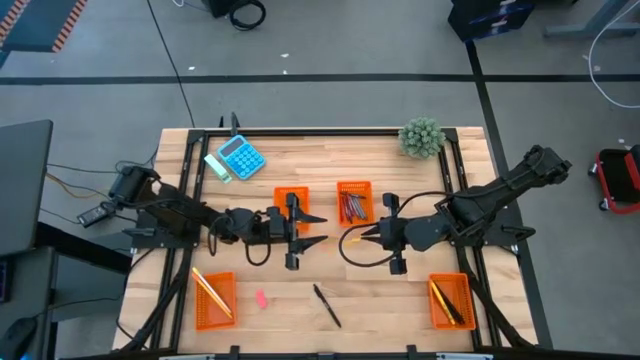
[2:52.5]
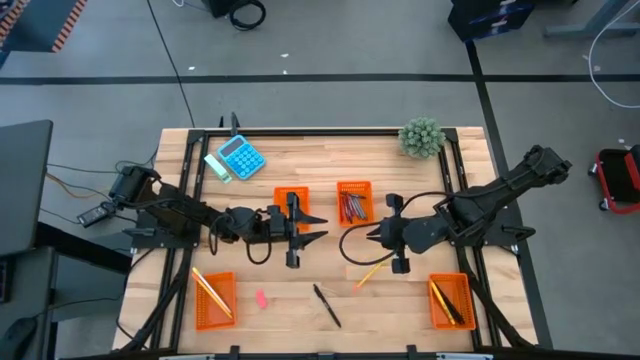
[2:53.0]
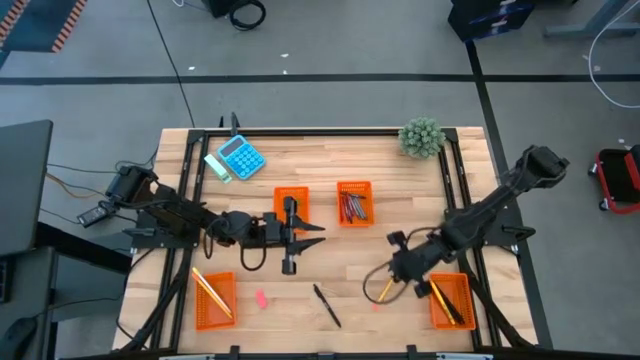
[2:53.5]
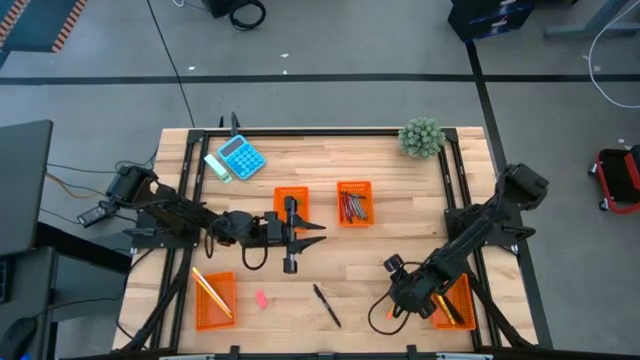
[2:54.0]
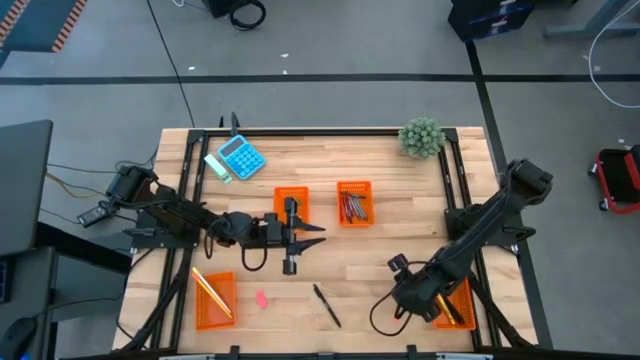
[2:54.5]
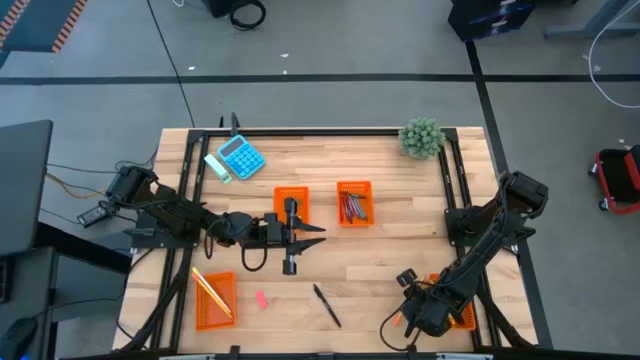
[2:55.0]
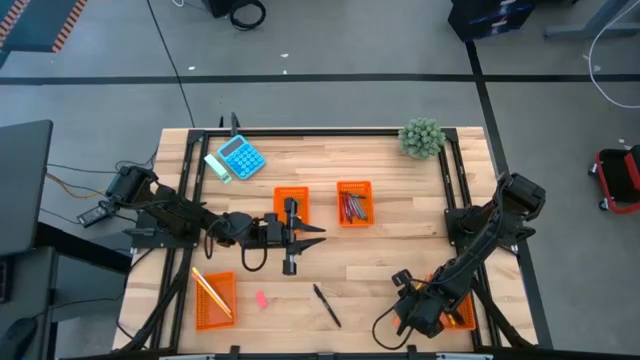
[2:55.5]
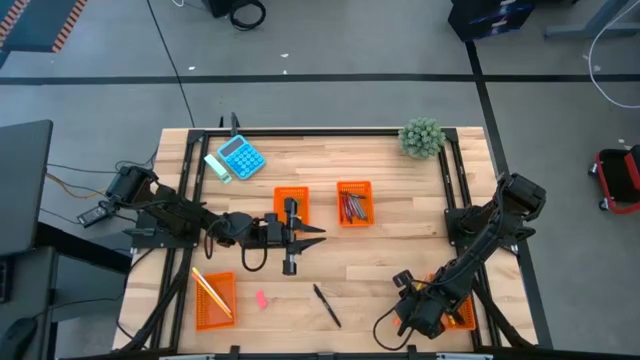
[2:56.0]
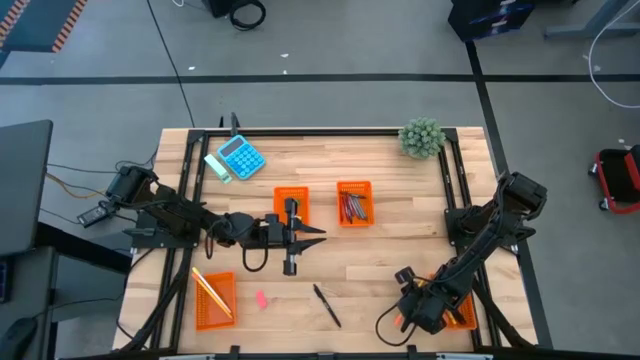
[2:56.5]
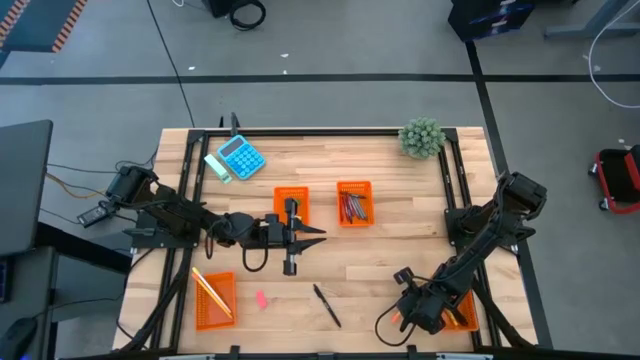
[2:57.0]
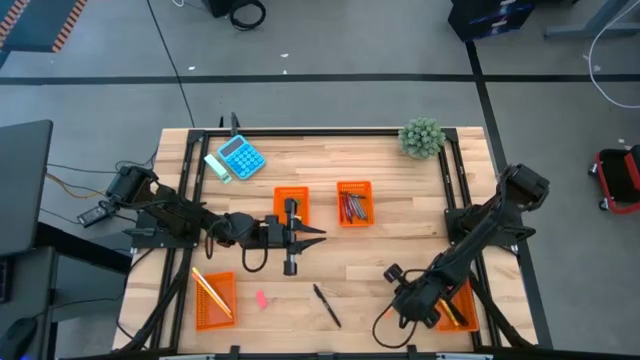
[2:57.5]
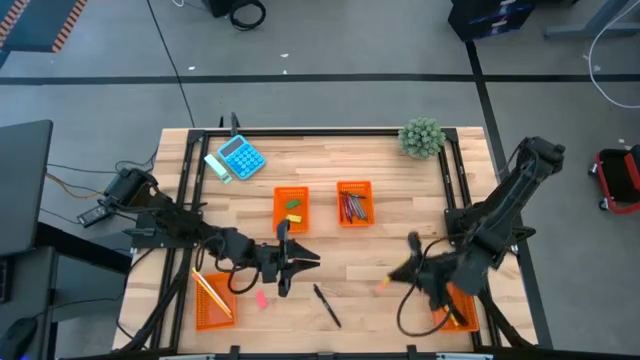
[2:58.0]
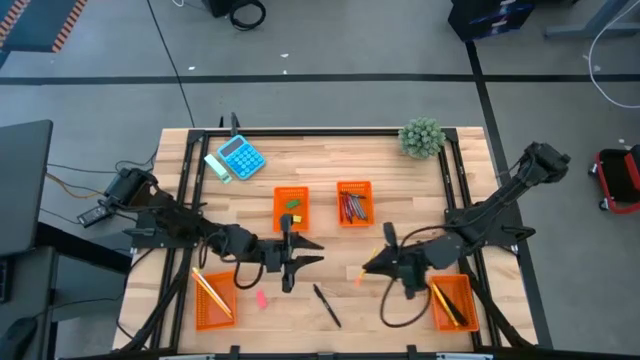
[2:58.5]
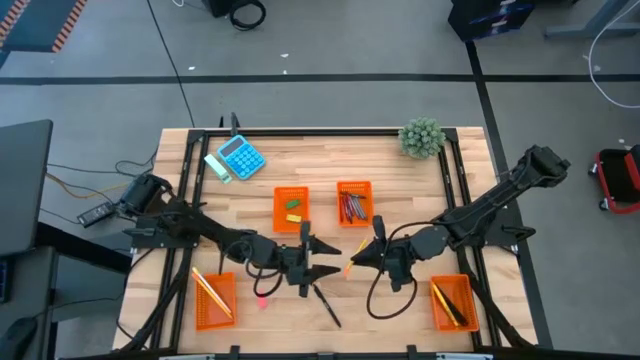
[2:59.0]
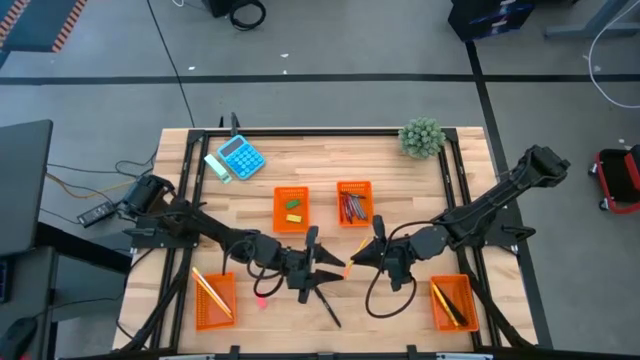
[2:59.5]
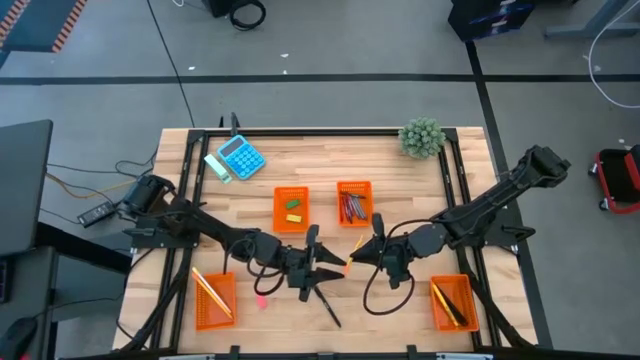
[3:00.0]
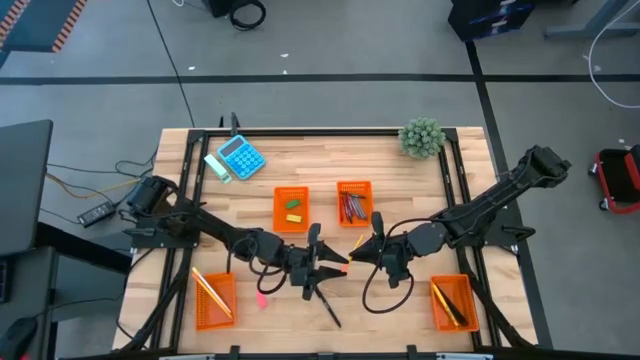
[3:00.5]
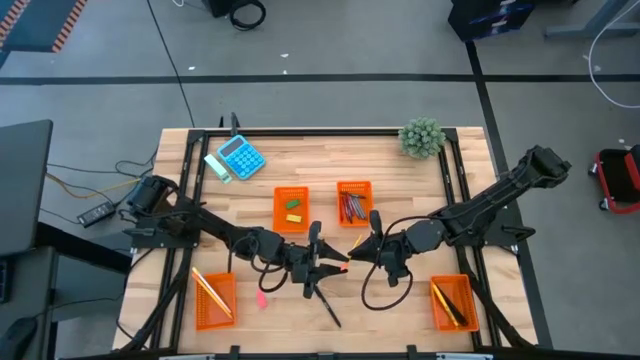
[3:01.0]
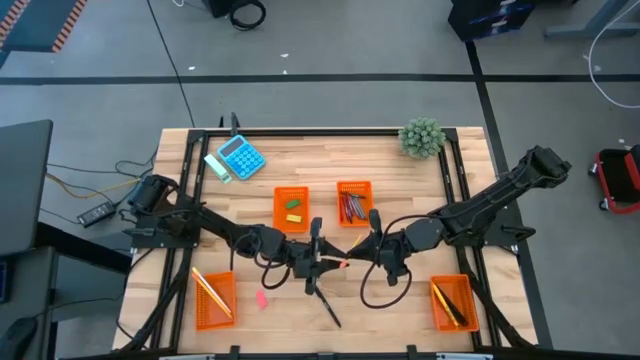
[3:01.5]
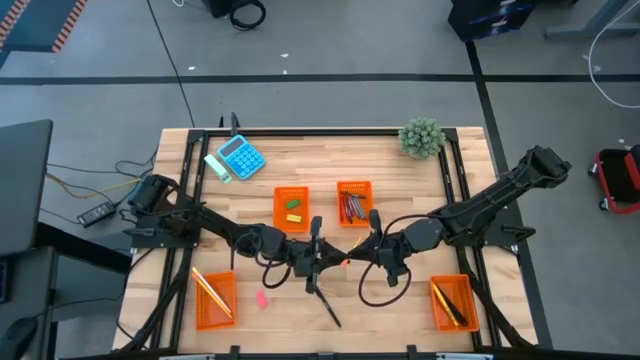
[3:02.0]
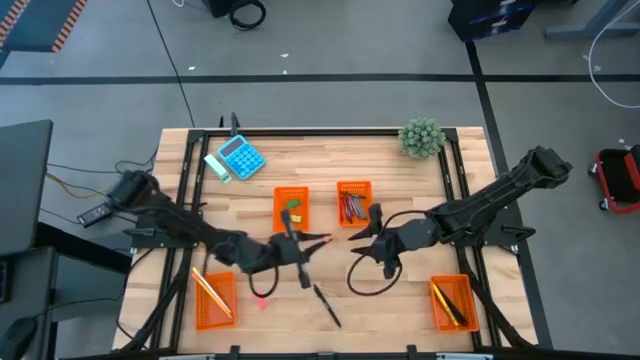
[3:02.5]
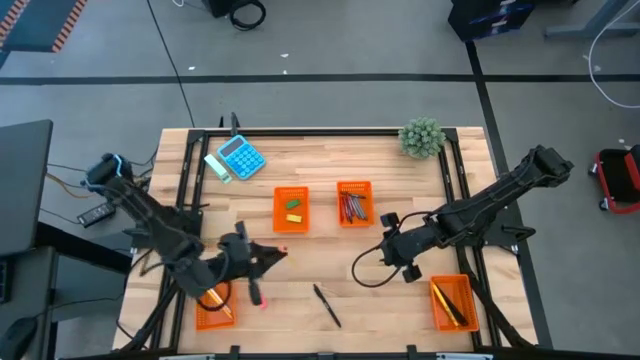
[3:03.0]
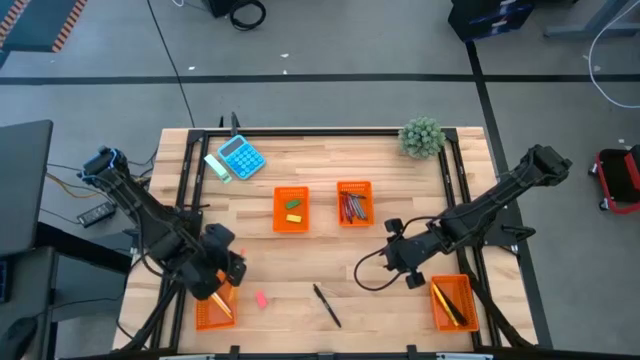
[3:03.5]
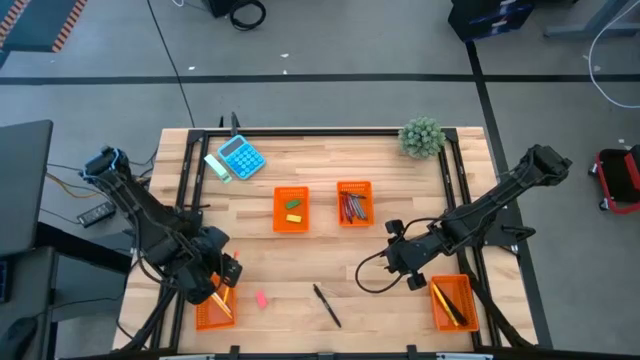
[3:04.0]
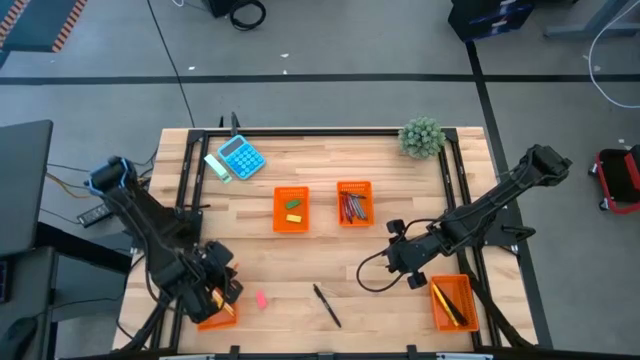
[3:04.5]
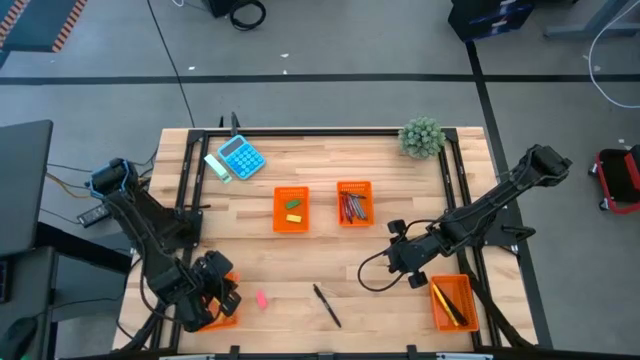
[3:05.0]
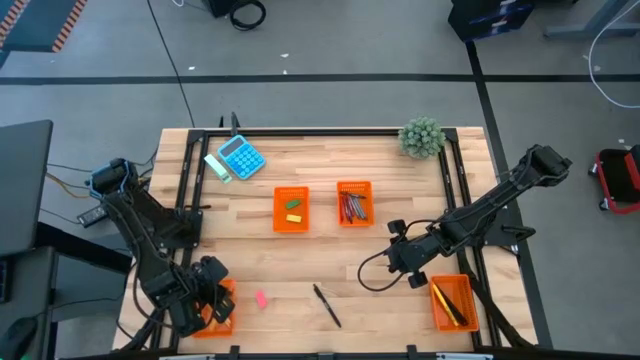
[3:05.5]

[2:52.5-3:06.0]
Task: Sort crayons/erasers/pens/pencils in bins
Put the yellow pencil into the bottom left orange bin

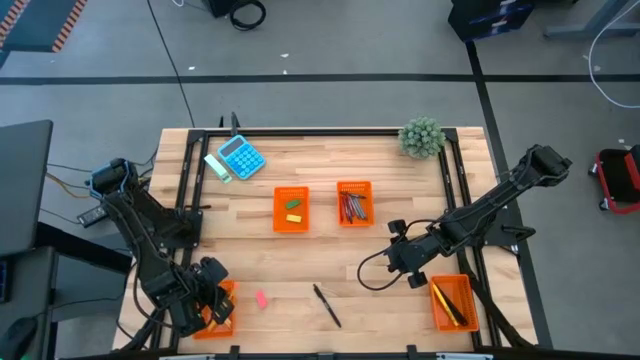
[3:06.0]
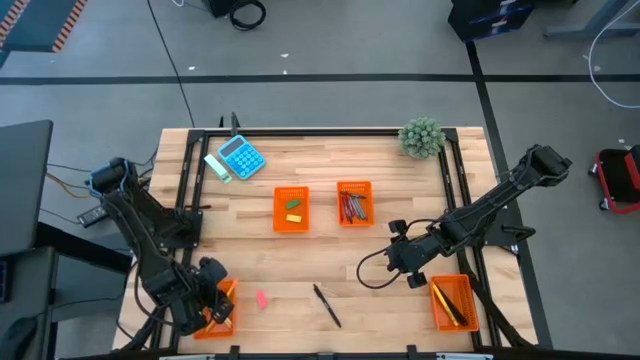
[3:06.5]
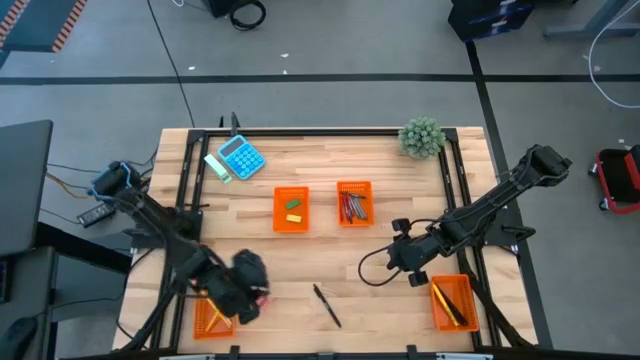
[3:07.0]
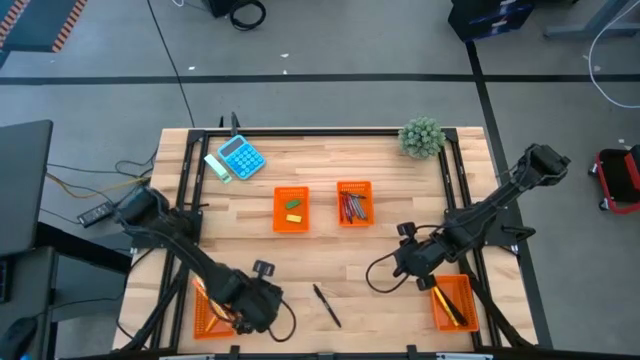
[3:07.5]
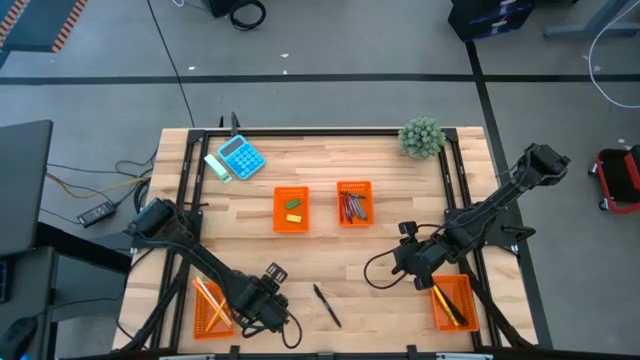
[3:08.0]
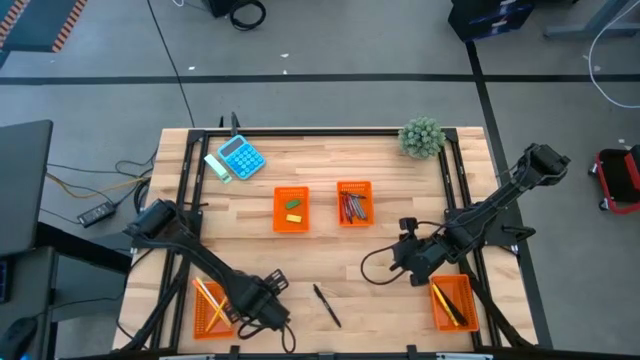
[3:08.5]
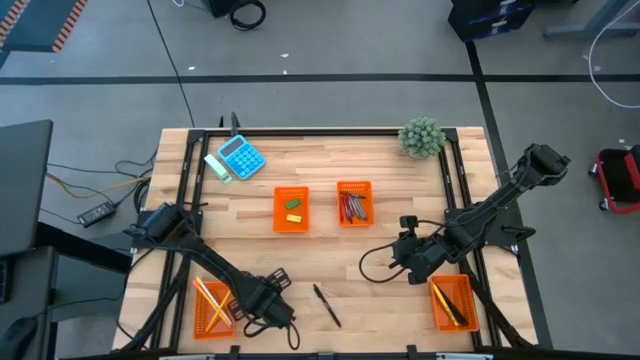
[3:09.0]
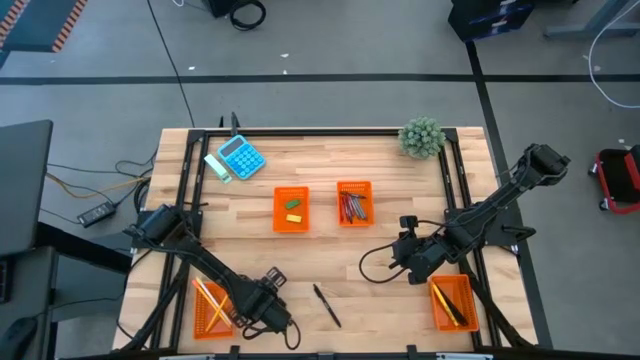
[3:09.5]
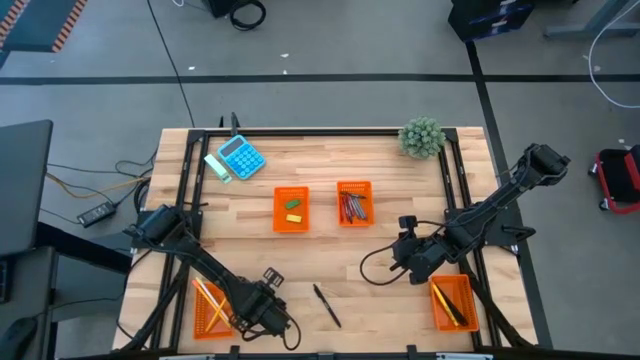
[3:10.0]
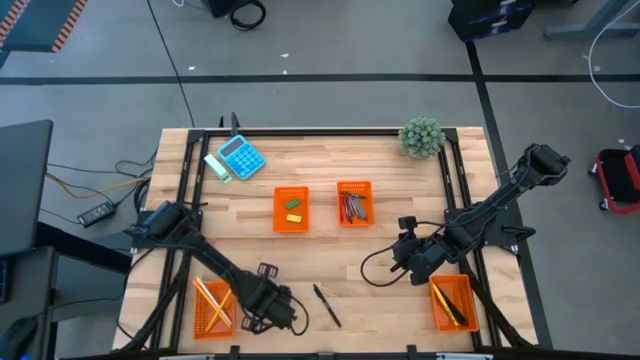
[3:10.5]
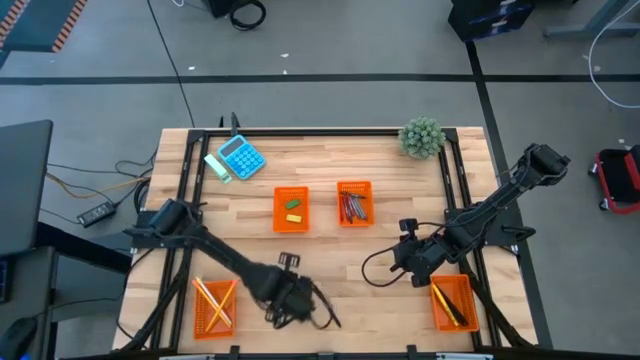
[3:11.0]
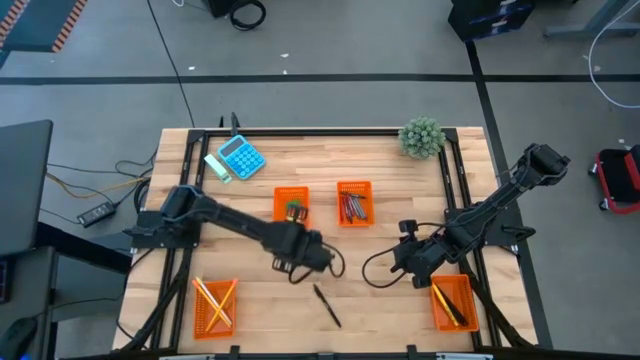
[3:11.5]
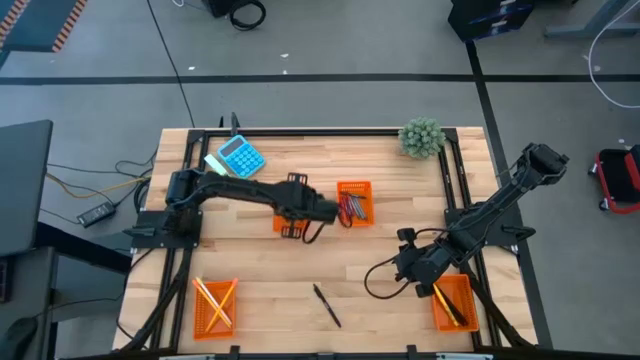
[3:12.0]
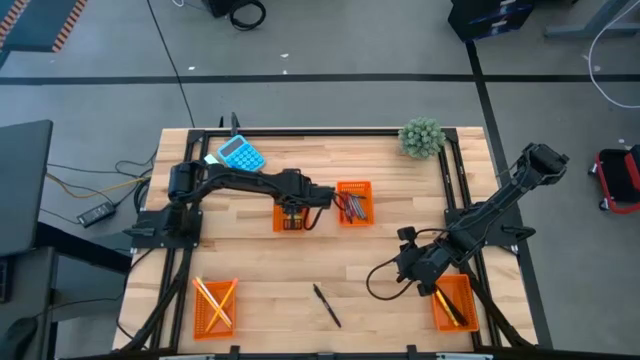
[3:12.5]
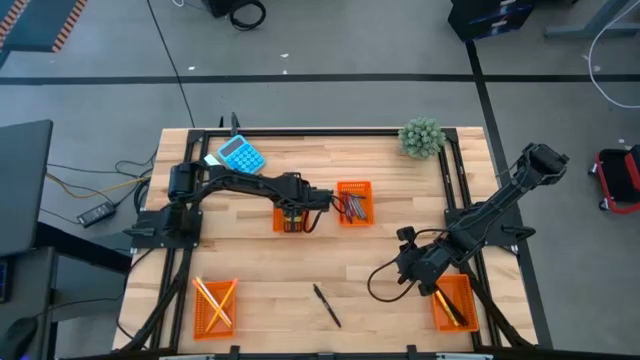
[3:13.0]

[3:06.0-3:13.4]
Put the pink eraser into the top left orange bin
